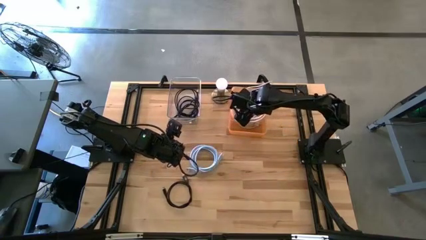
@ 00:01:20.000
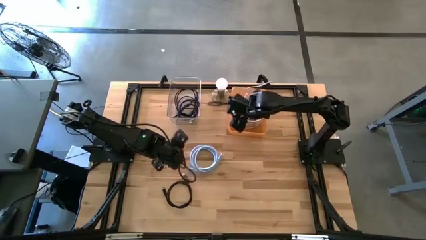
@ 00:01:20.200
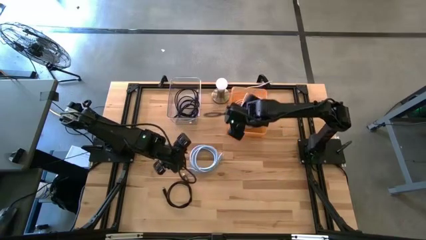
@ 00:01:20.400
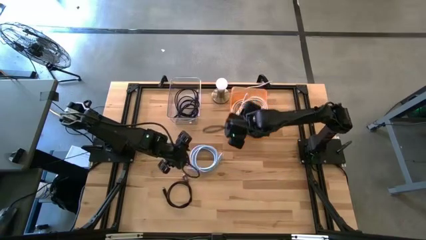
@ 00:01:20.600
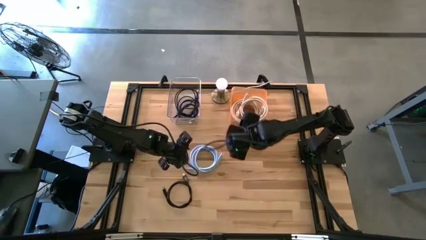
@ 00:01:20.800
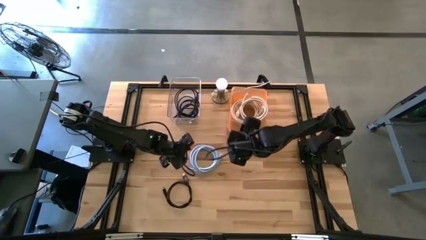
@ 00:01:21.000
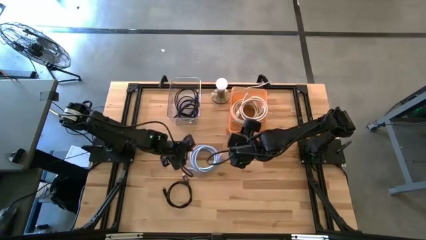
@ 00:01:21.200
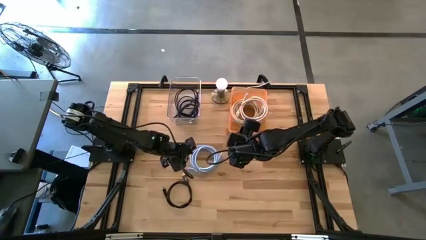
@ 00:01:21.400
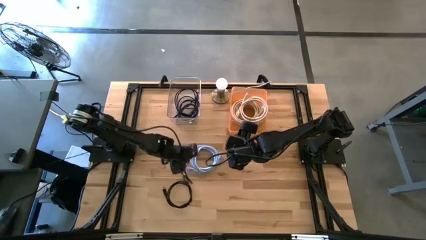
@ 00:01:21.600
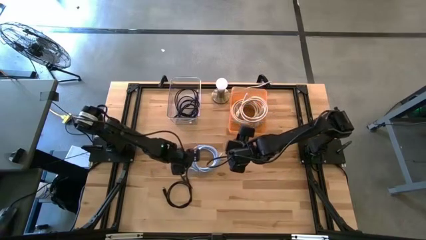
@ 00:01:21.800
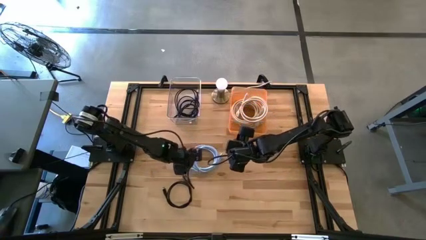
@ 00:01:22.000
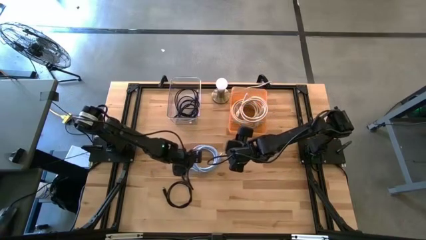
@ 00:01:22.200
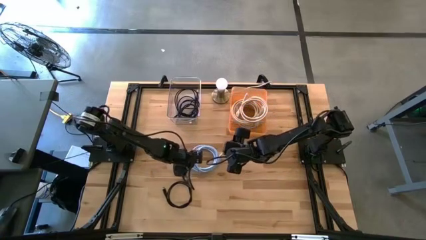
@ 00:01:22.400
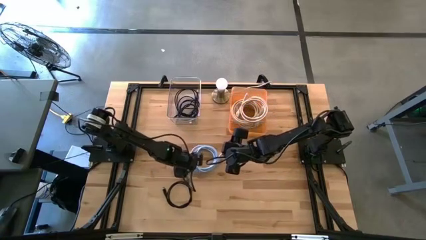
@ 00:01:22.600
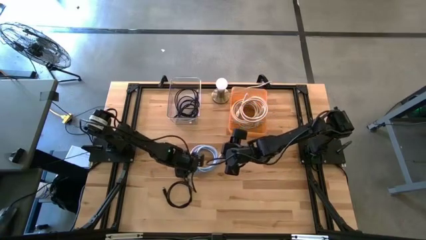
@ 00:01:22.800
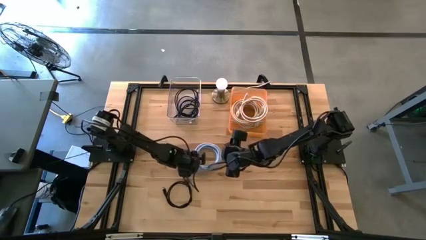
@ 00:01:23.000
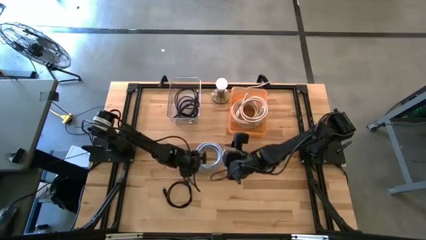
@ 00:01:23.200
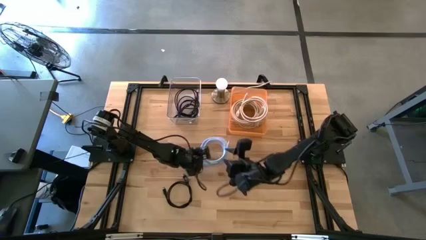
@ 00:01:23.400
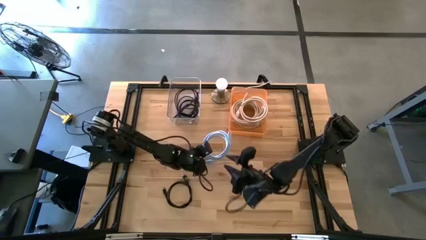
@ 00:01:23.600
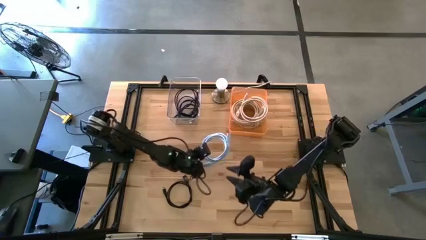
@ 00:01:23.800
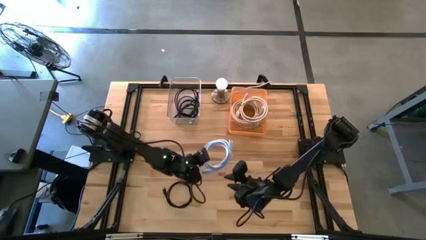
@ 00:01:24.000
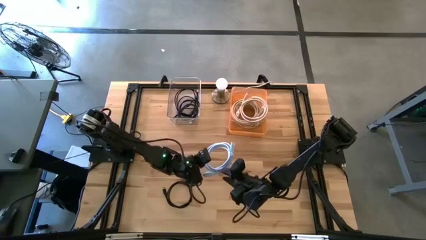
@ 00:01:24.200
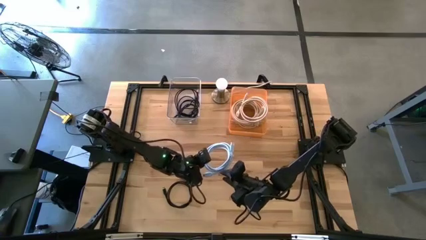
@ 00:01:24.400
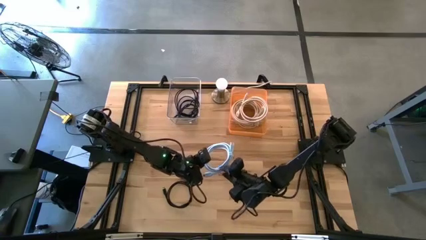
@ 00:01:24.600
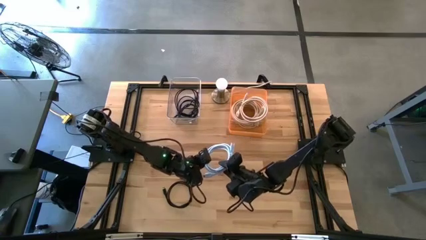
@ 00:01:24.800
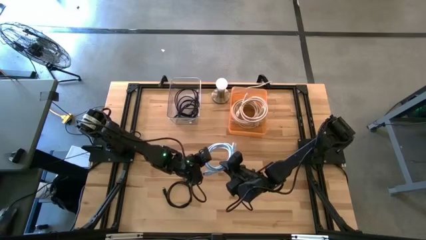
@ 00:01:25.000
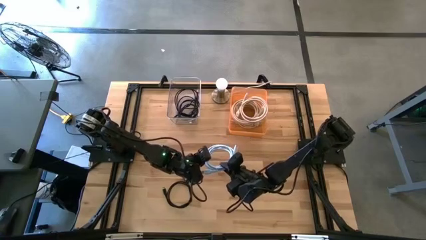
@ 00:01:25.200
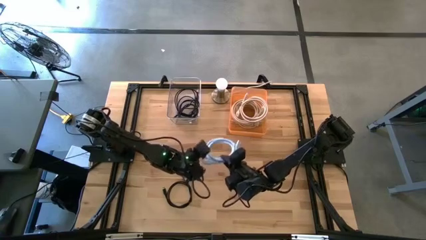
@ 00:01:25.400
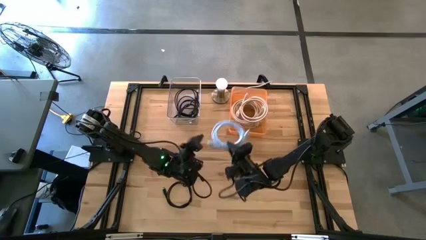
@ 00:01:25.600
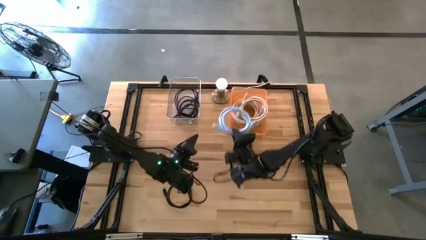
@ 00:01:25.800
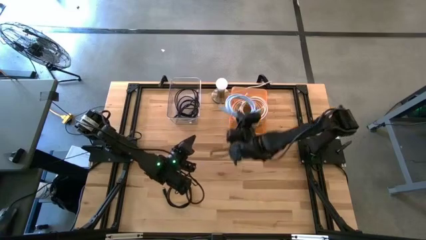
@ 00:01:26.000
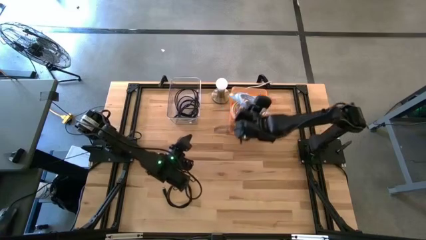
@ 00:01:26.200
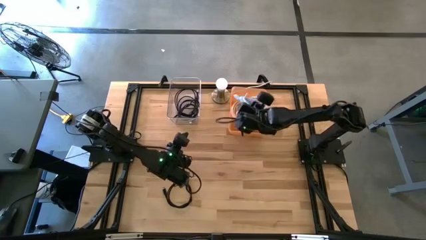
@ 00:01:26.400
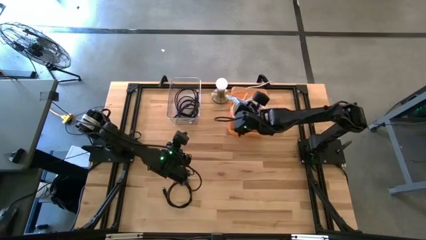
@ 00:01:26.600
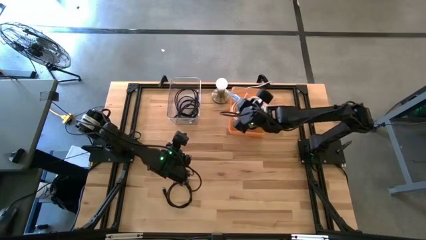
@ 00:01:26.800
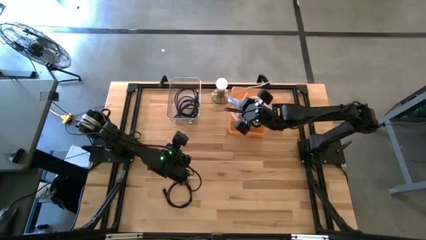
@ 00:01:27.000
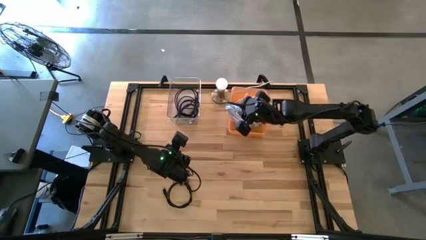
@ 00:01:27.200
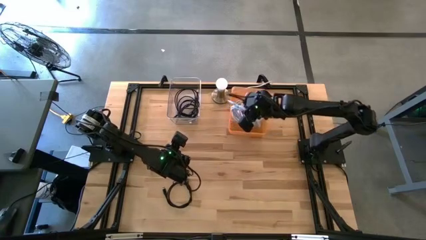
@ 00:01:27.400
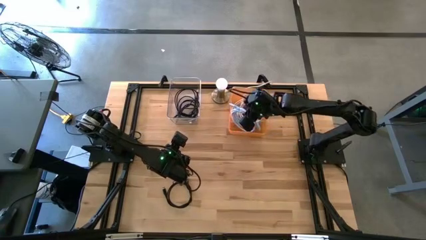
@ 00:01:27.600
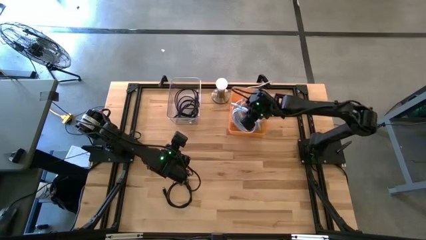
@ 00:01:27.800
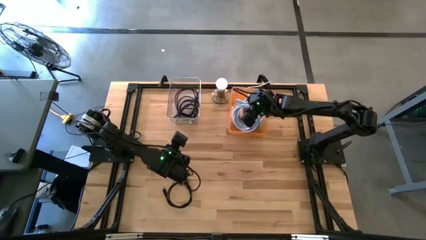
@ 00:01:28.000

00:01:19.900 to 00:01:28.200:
Task: Pick & Place USB Port
Put the light blue charger cable into the orange bin

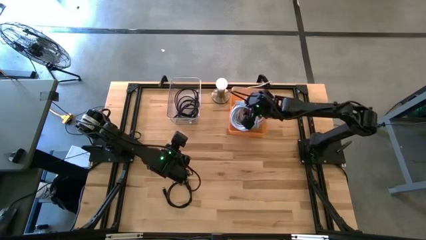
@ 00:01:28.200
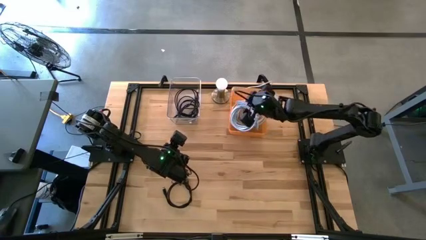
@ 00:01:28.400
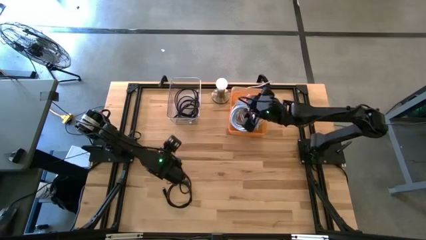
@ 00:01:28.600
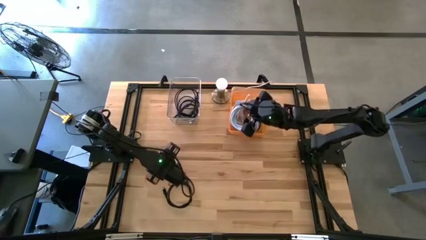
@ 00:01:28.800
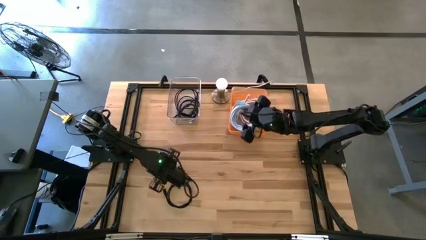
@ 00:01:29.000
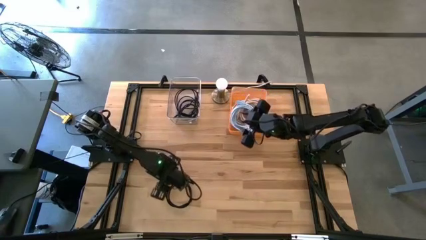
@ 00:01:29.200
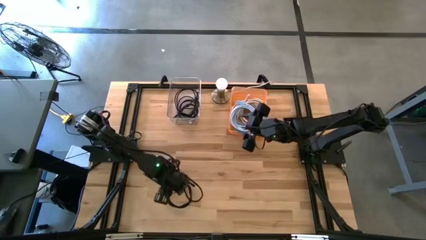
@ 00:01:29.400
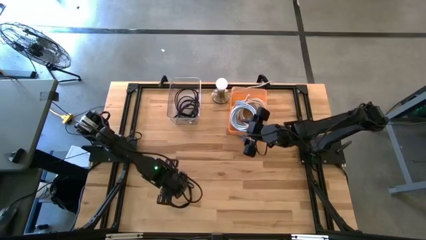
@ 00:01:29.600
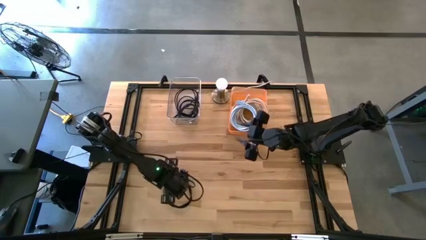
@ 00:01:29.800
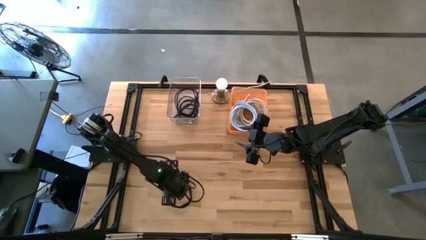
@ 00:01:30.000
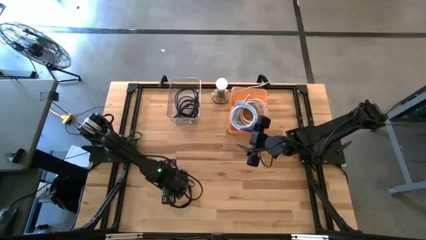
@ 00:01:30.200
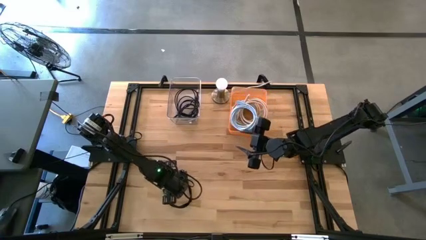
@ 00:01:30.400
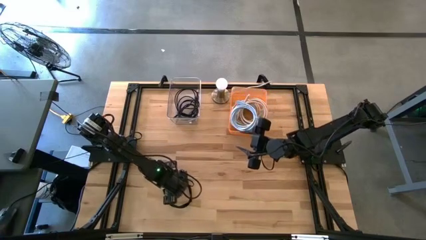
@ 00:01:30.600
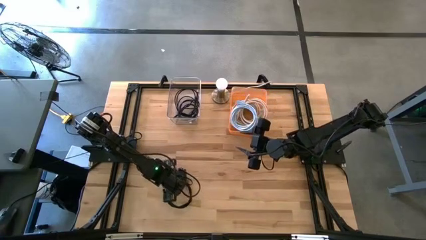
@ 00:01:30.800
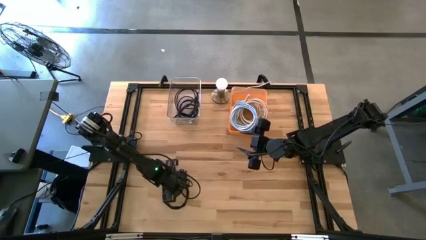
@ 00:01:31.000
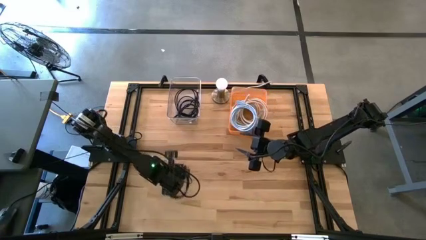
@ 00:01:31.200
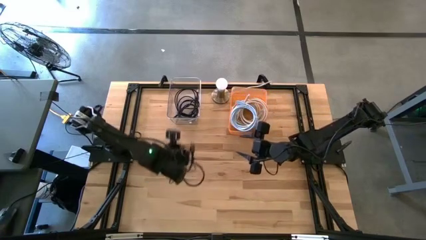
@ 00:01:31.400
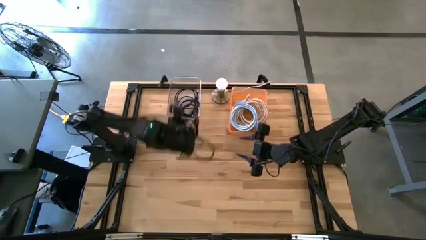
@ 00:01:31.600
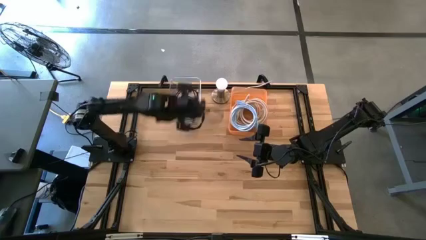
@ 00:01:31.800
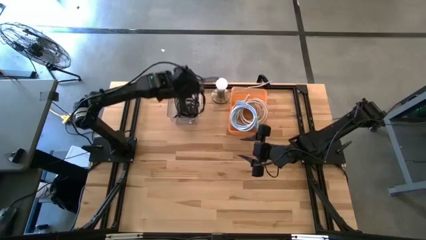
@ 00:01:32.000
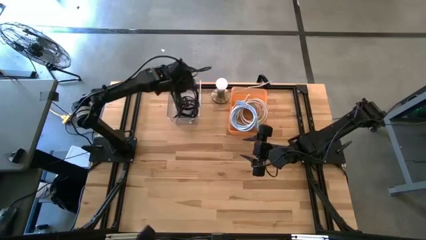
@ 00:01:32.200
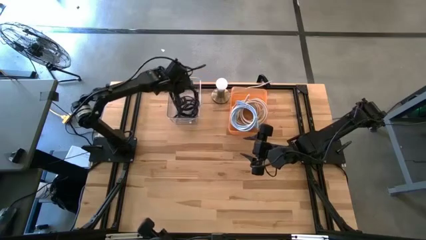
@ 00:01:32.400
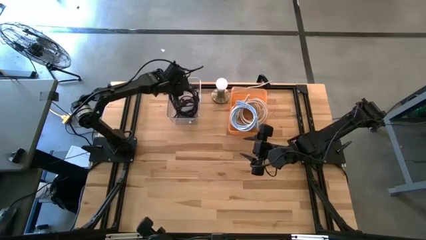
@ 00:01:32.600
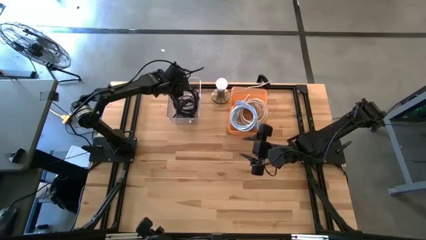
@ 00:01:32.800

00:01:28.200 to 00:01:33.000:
Put the black charger cable into the transparent bin

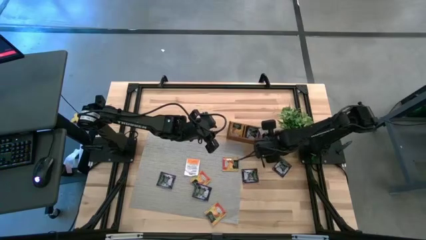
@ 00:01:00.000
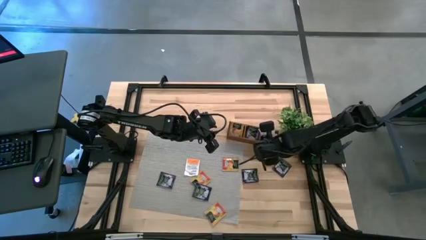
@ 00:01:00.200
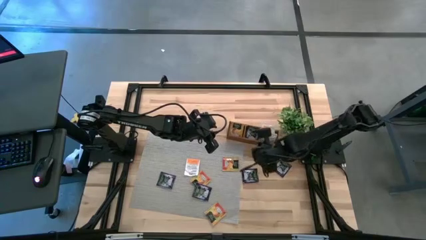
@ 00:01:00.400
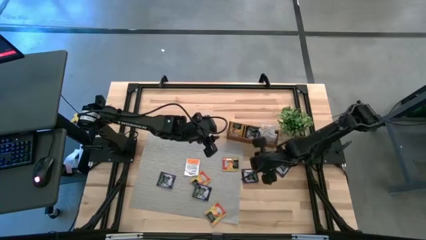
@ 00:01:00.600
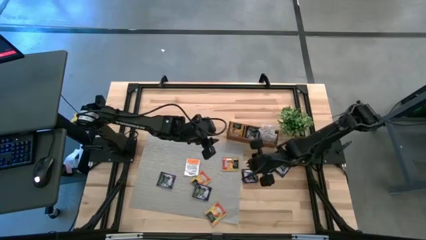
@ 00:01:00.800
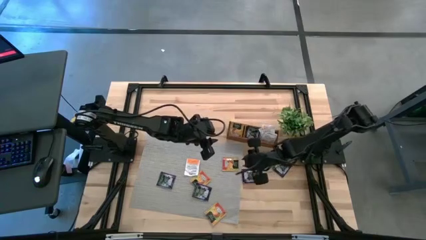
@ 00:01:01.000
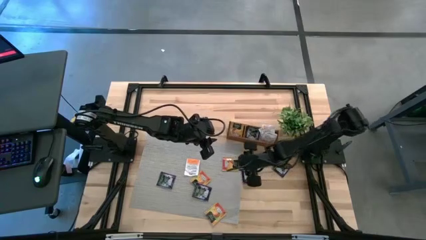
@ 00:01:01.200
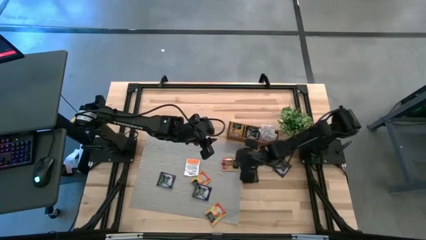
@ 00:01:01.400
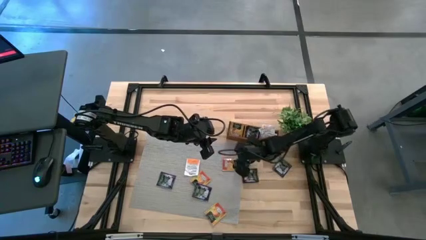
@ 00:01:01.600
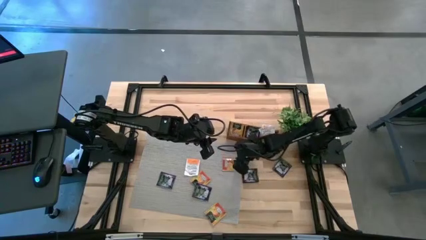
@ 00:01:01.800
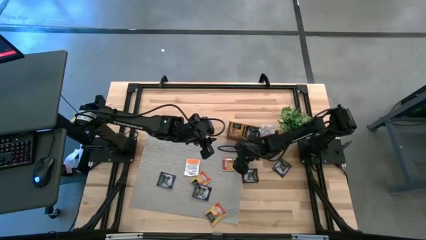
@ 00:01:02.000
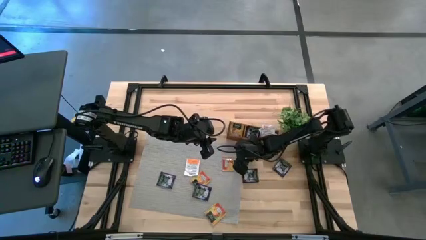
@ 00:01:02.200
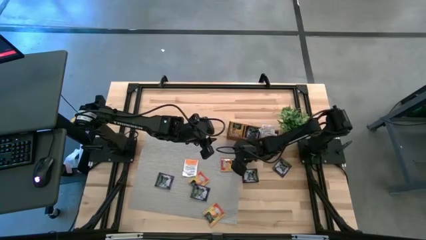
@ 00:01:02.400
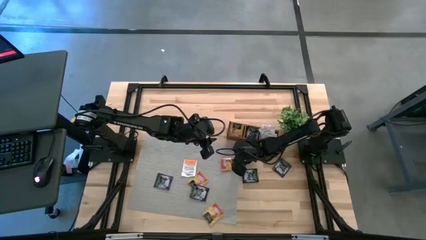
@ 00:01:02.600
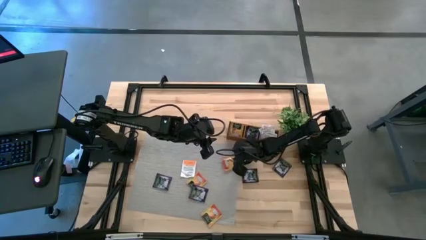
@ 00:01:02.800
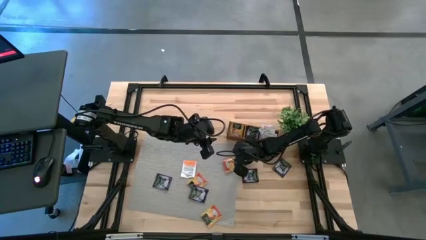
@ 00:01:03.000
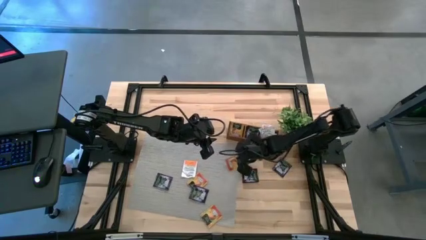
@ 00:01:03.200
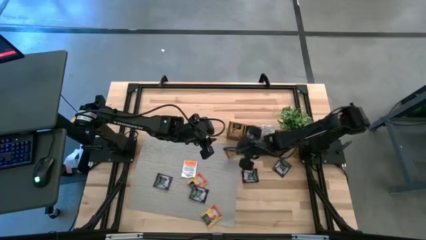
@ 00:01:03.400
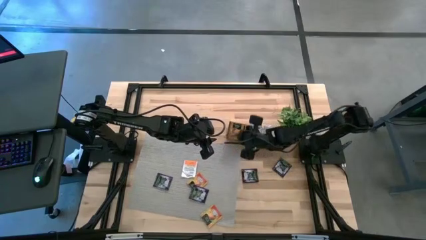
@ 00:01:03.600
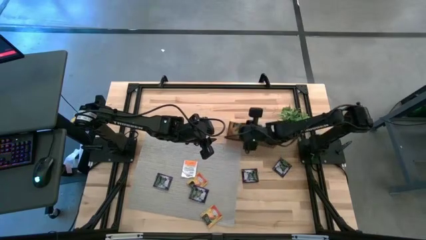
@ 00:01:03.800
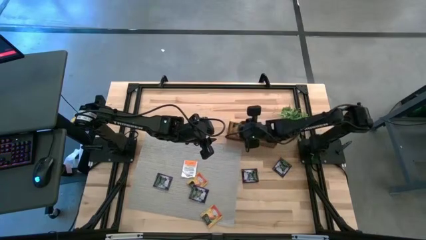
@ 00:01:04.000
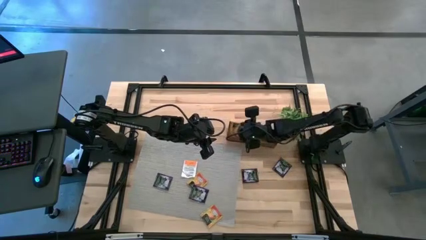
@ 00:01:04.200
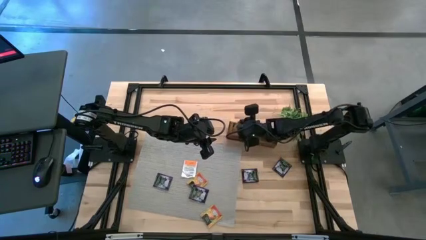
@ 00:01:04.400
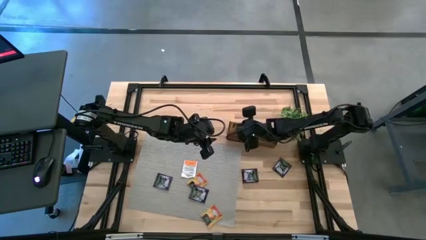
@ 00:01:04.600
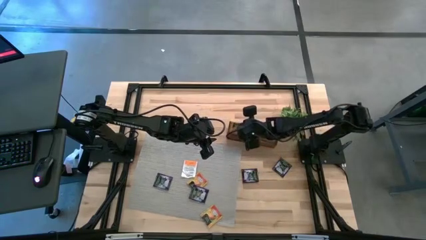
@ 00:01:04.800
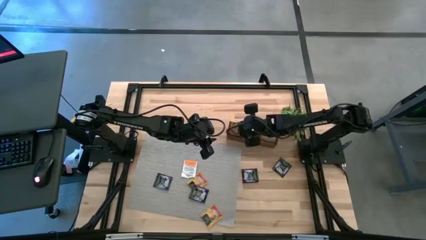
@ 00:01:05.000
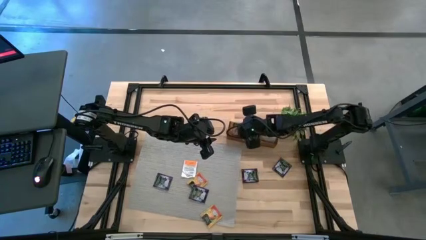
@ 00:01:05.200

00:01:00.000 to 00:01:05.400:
Task: Pick & Place Tea
Put the yellow tea bag in the left section of the wooden organizer
